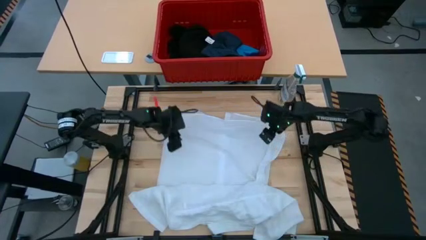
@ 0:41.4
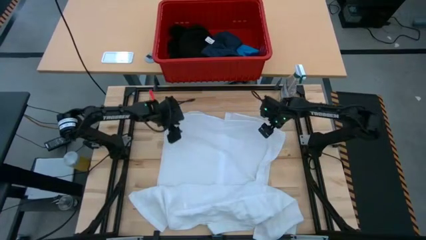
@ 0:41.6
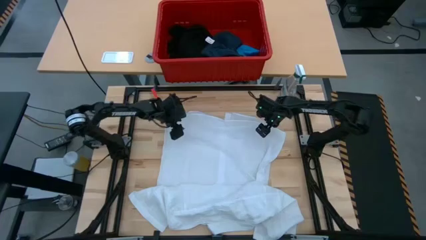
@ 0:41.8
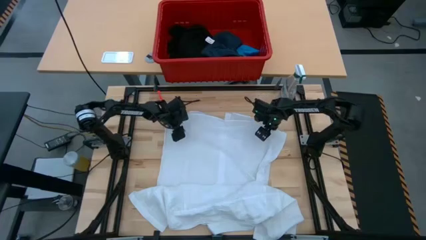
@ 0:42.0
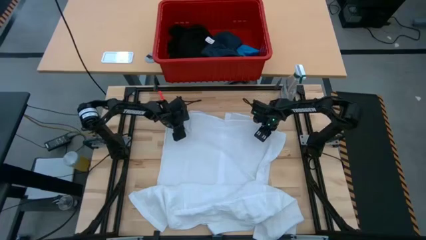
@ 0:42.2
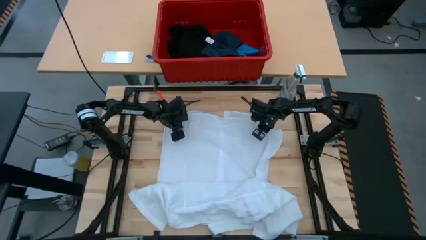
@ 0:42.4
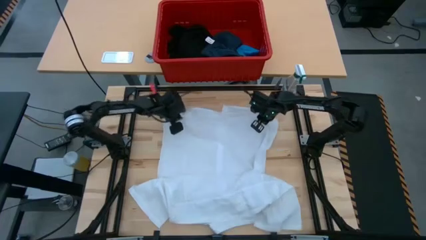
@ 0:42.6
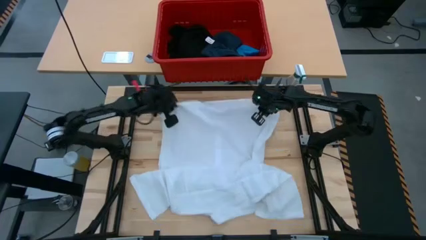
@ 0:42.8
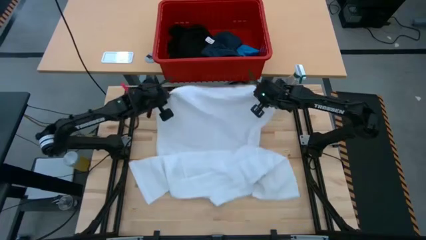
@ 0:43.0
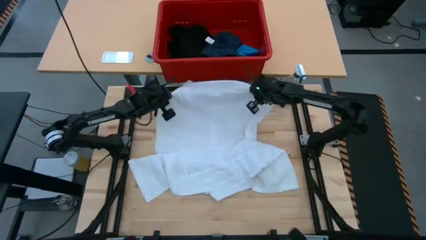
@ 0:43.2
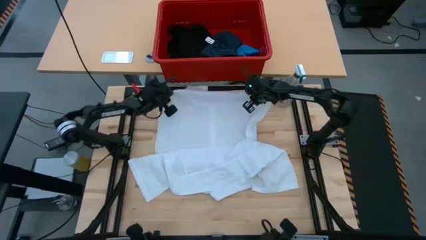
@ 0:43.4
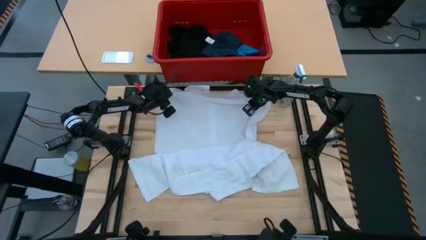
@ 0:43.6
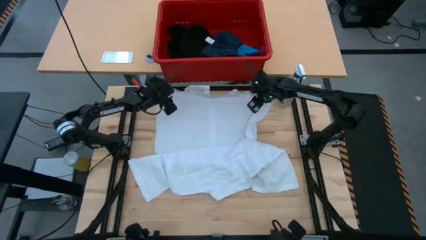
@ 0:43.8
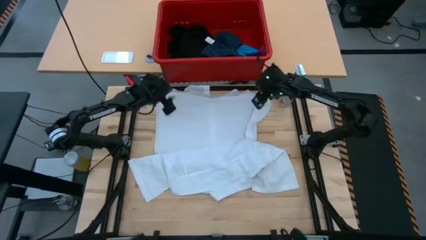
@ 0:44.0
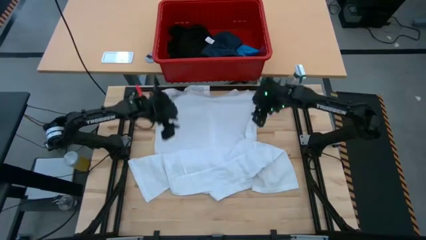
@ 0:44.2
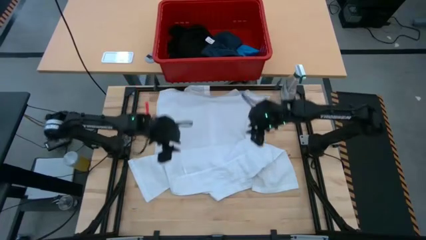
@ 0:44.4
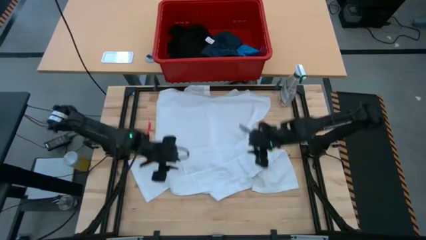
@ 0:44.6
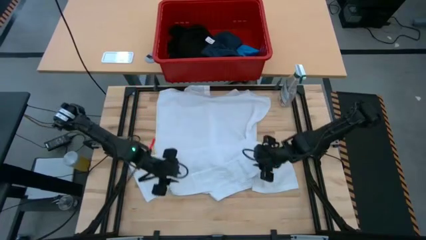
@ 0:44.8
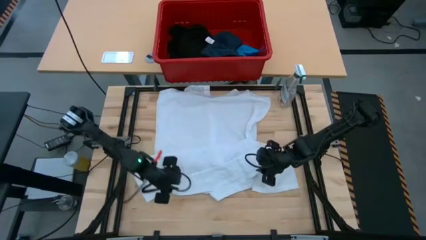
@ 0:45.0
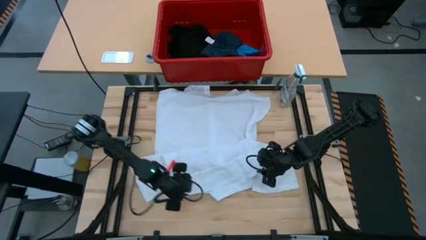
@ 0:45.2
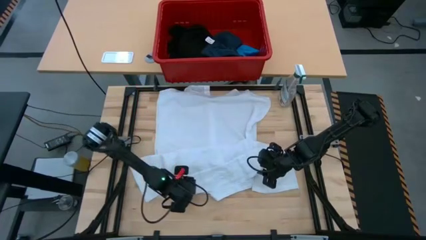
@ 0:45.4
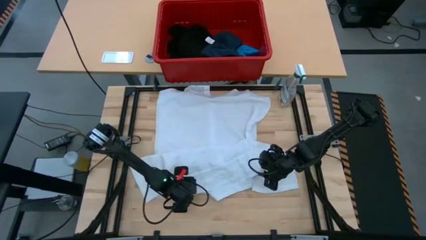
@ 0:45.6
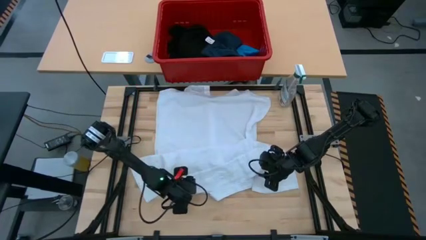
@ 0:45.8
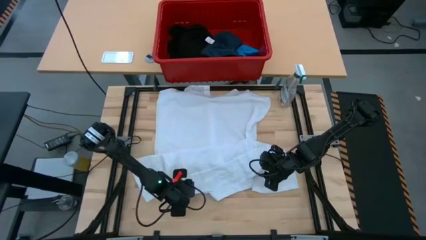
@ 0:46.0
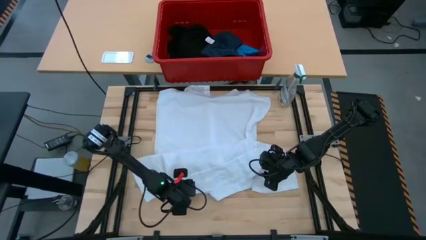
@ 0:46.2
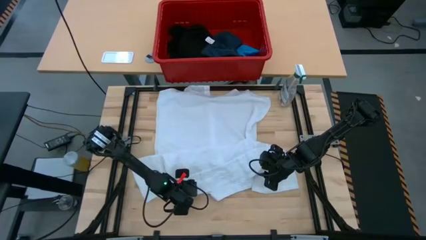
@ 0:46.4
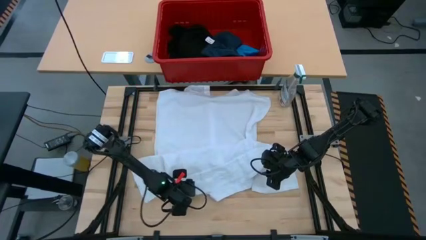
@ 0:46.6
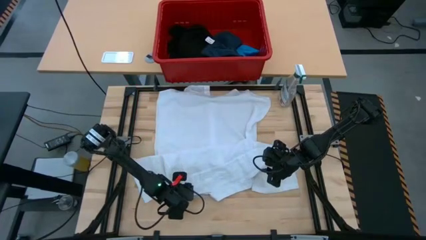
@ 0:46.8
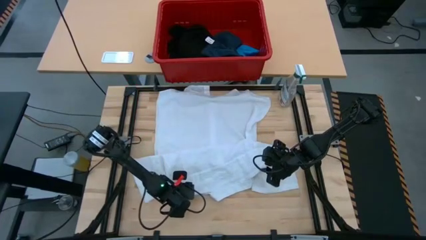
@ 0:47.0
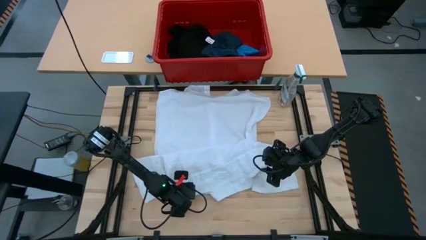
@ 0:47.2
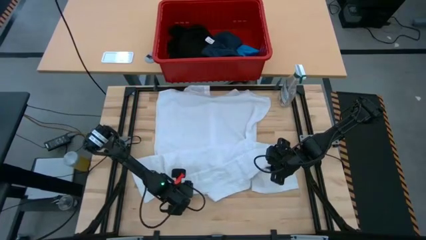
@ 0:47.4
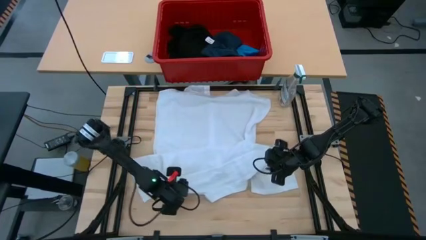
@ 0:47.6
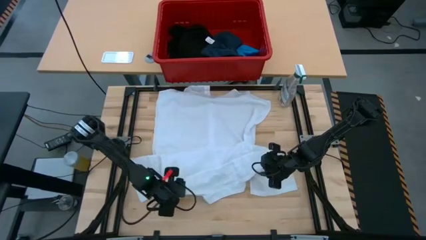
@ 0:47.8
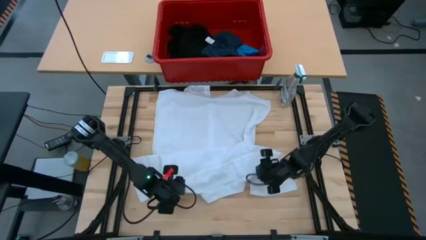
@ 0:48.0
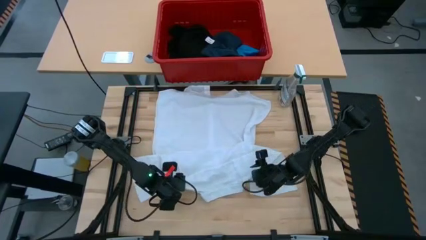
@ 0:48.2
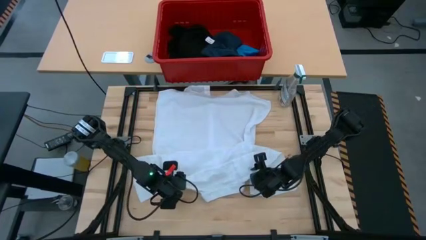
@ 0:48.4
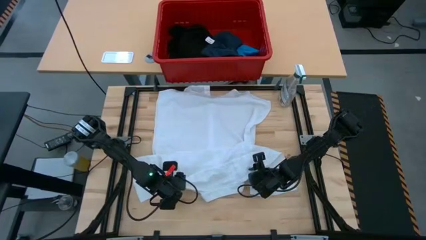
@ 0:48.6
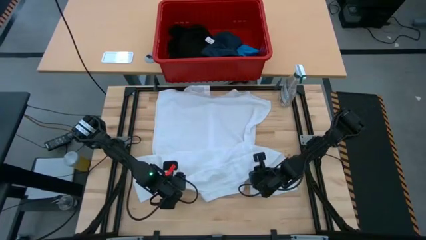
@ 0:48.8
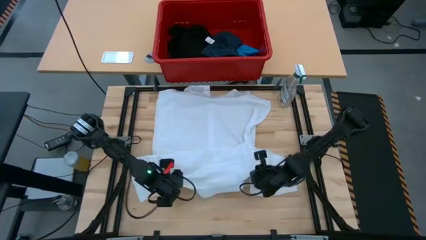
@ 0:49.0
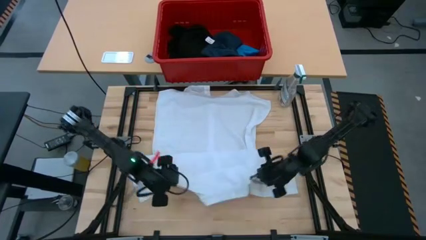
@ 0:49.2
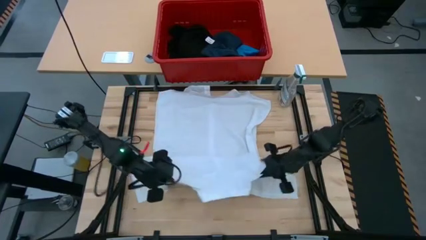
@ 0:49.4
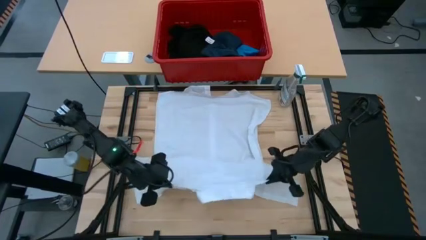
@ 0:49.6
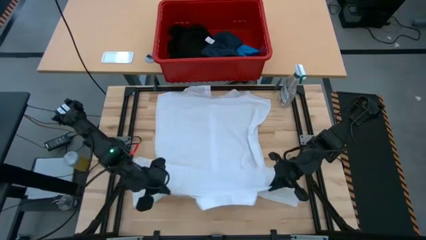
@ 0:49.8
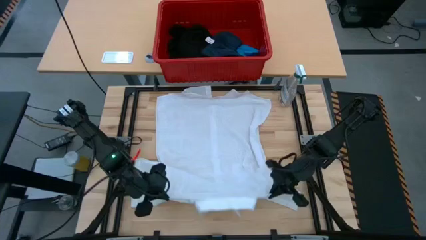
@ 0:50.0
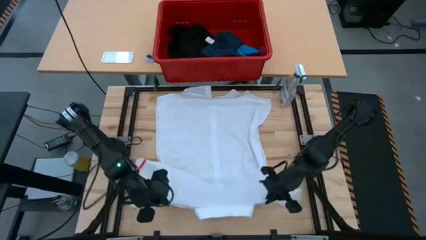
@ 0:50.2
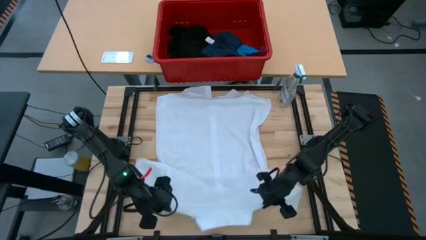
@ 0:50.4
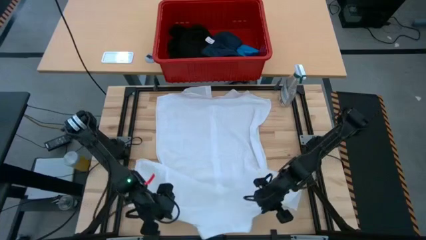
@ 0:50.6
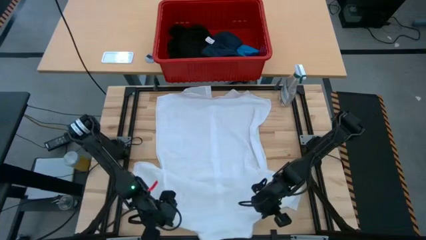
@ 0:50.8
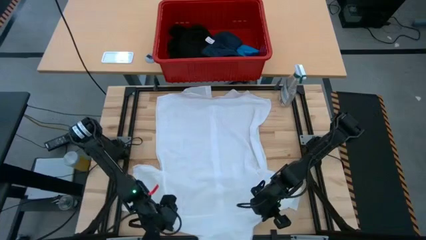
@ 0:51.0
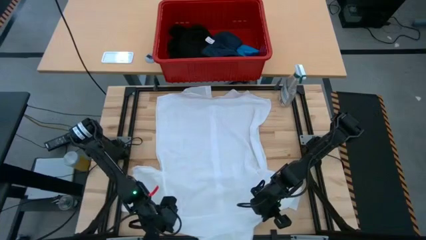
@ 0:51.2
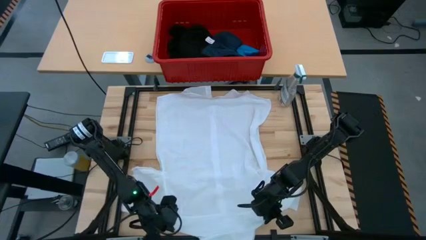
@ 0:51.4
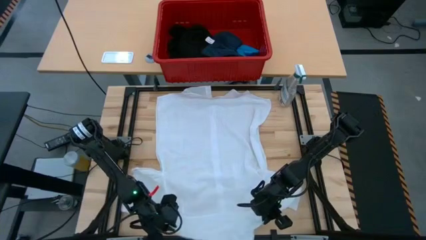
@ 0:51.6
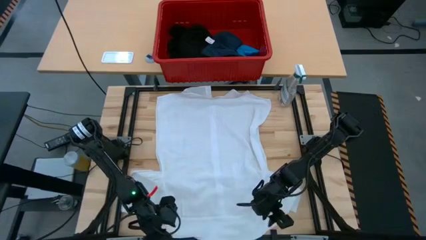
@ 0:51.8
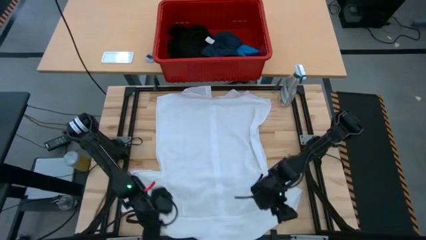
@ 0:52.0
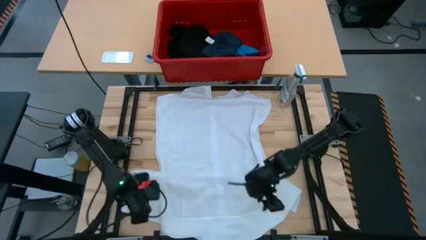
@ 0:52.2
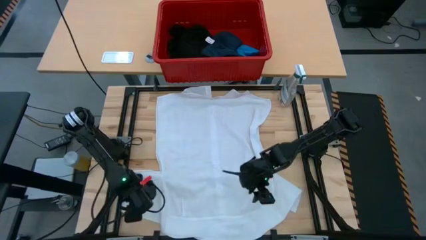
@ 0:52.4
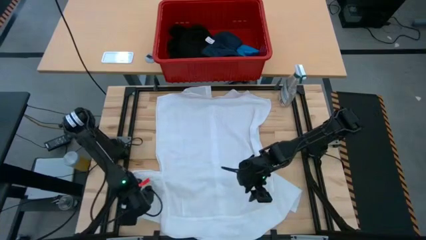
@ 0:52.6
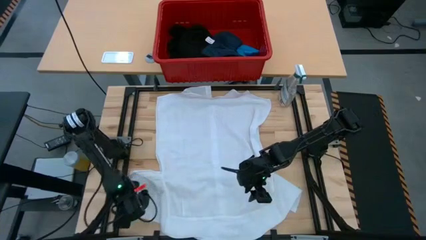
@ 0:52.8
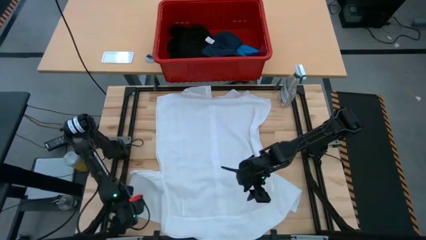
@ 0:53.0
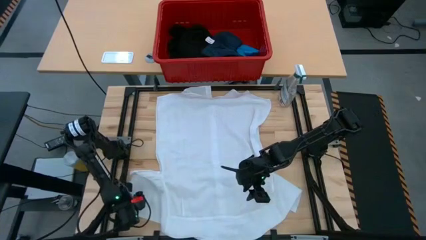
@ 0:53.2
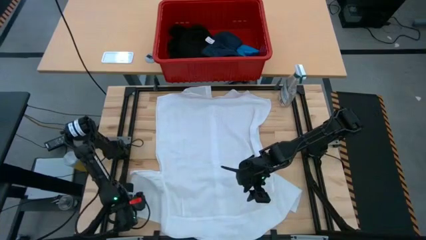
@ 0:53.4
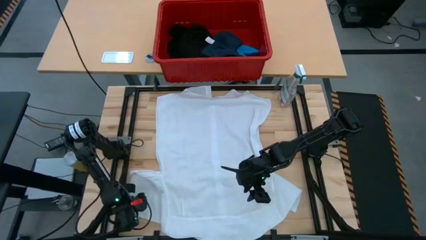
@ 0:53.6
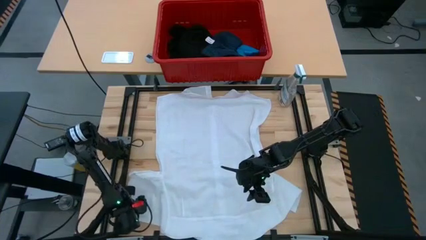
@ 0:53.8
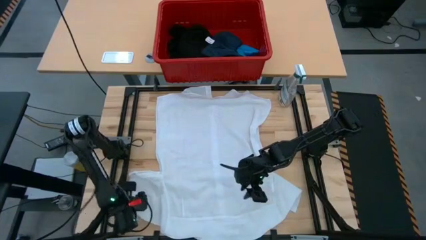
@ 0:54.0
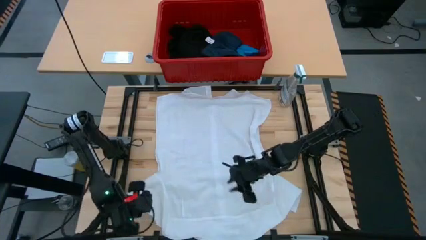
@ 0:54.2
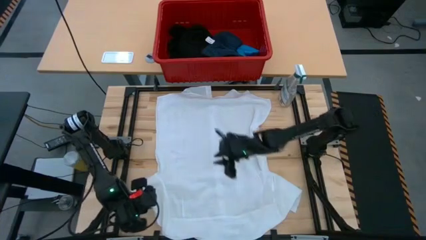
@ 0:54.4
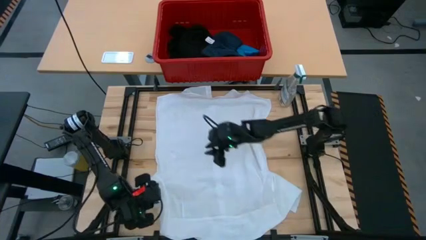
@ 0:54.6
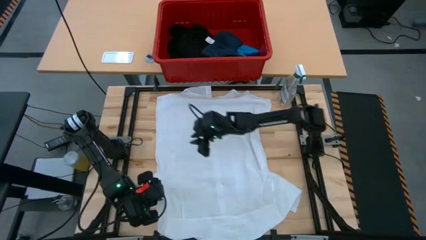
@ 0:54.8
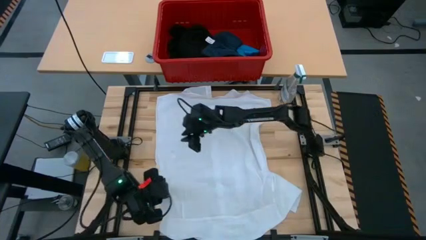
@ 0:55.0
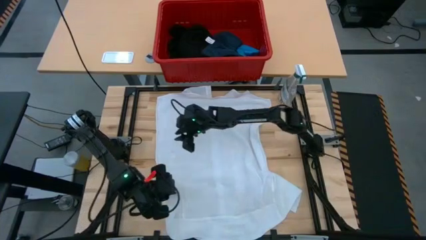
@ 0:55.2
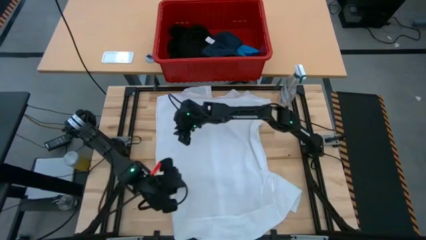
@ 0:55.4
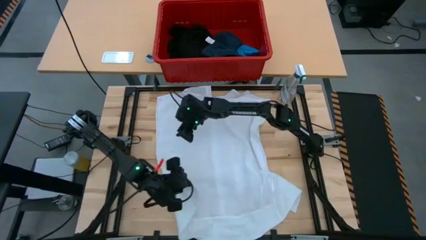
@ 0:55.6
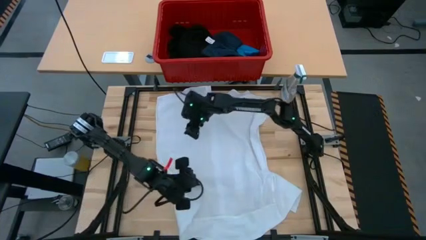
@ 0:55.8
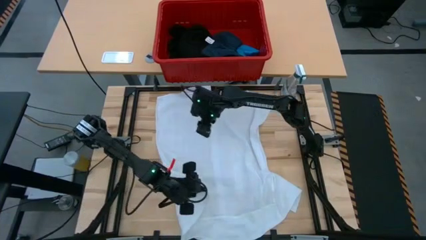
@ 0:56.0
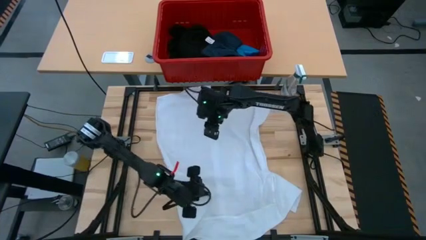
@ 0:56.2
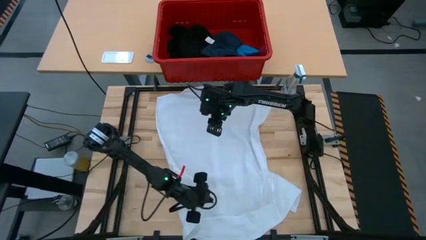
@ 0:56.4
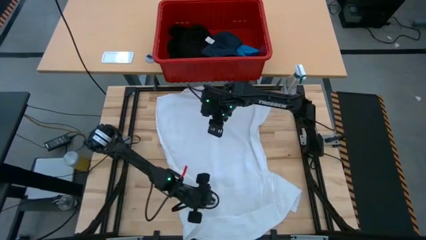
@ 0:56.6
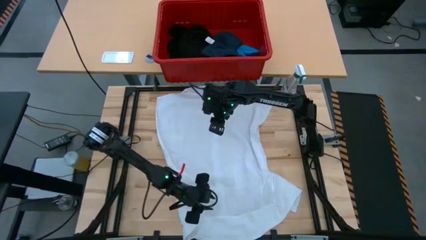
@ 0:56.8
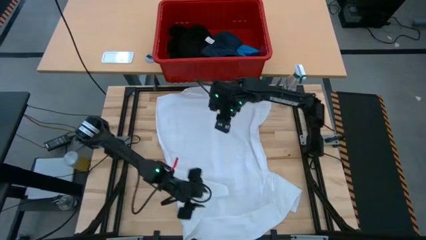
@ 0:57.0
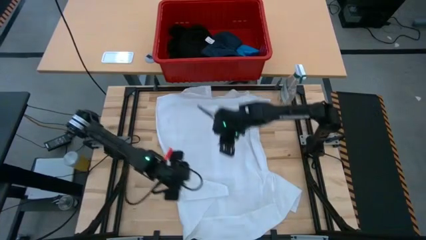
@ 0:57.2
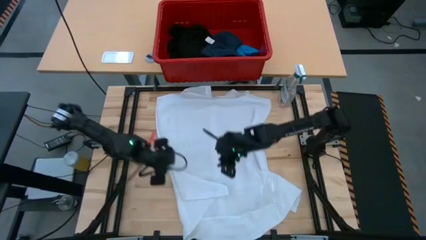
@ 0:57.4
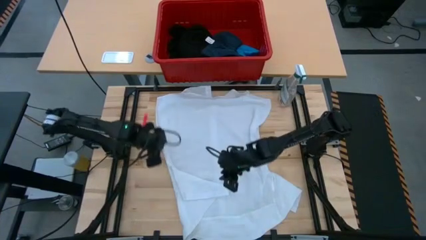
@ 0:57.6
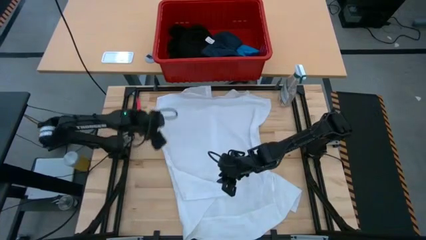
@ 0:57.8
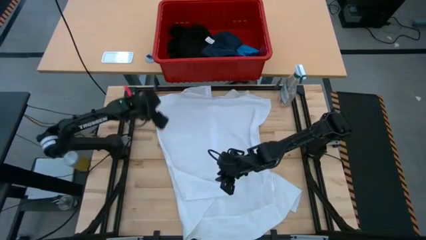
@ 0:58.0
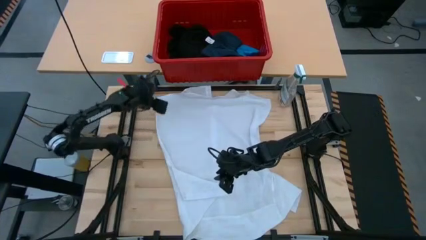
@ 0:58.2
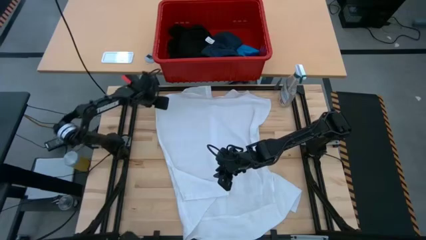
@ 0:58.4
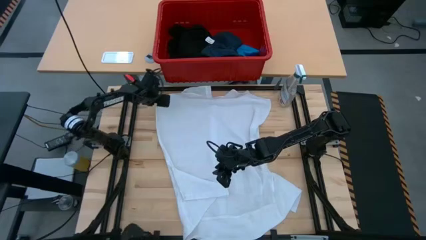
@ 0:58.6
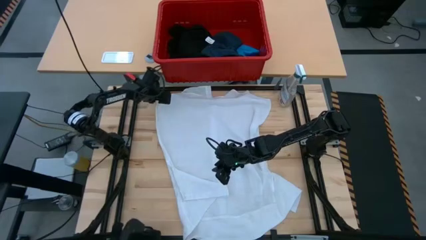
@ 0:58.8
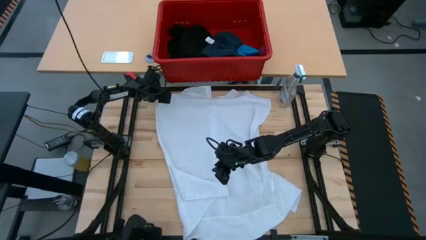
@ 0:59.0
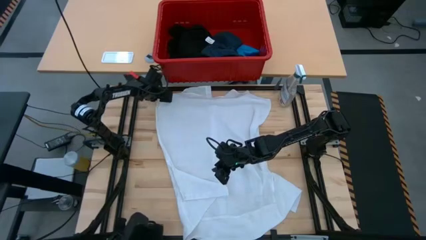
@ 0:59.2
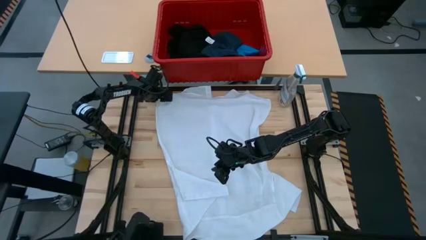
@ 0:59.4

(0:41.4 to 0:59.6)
Task: Fold Laundry from Bin
Fold the white polo shirt
